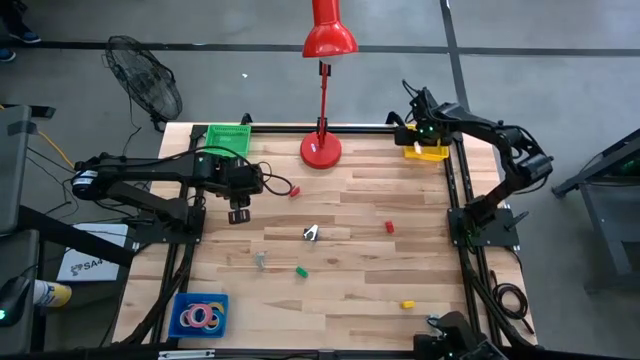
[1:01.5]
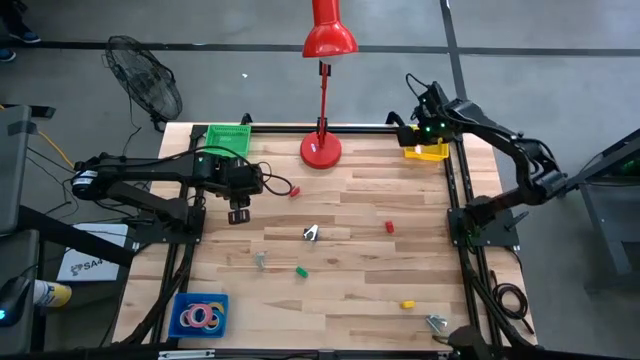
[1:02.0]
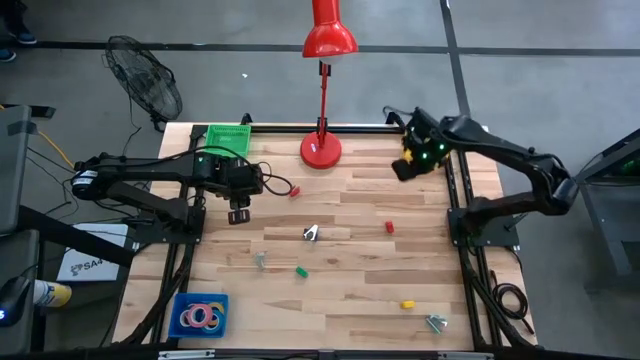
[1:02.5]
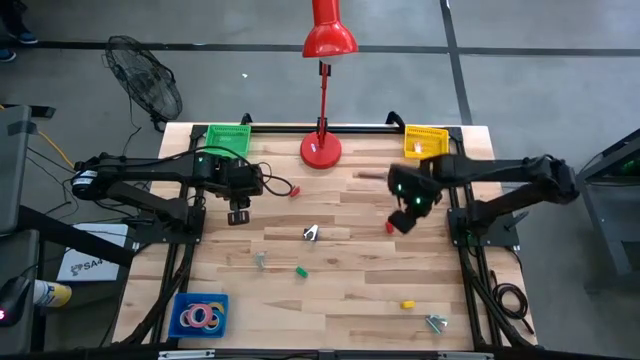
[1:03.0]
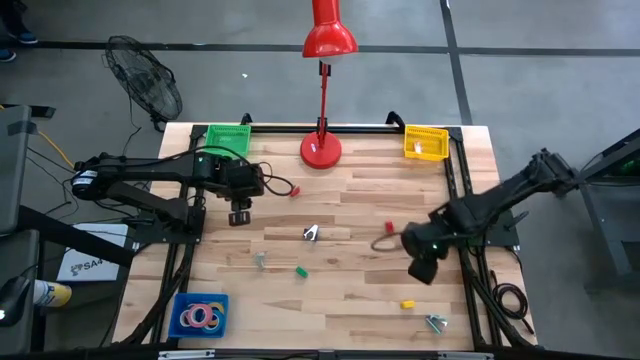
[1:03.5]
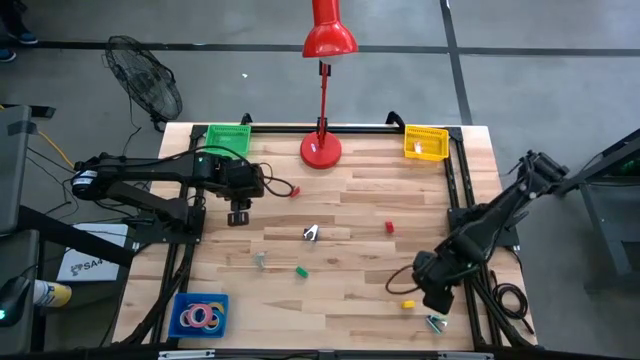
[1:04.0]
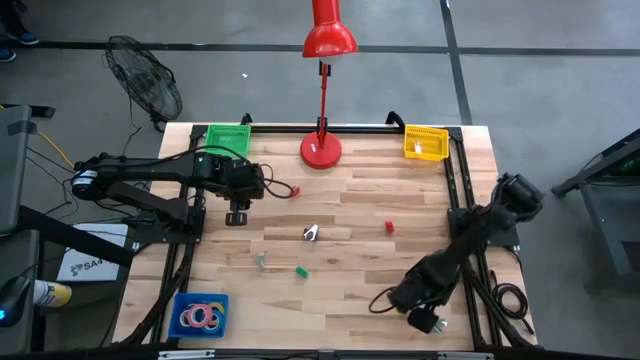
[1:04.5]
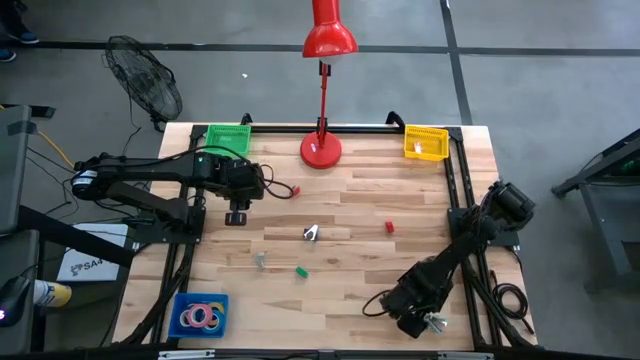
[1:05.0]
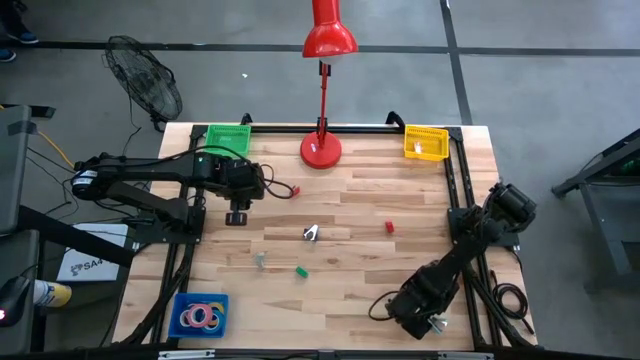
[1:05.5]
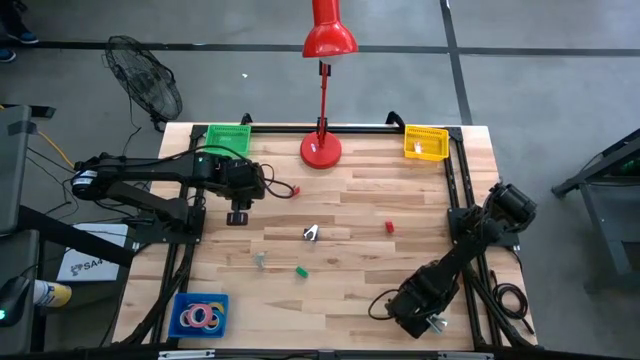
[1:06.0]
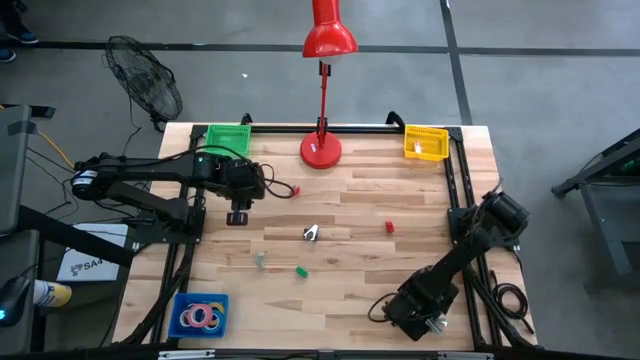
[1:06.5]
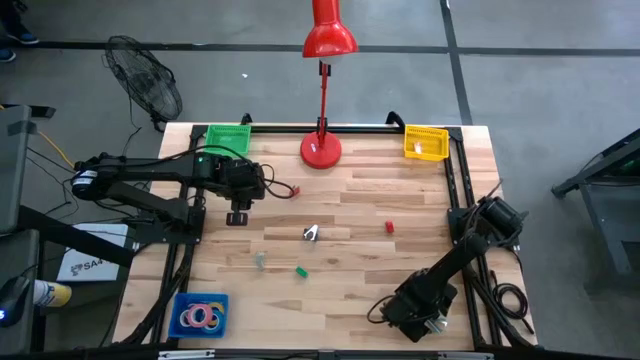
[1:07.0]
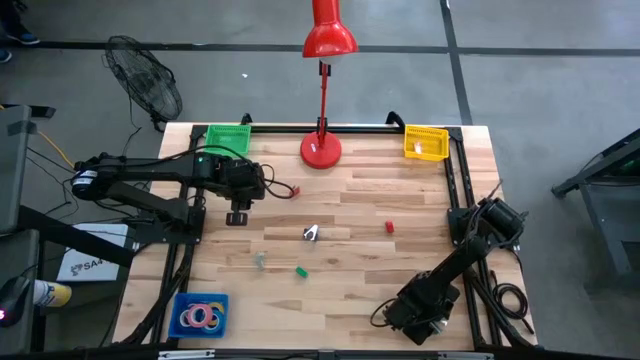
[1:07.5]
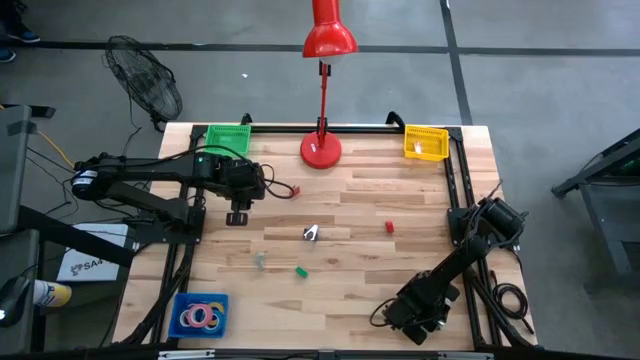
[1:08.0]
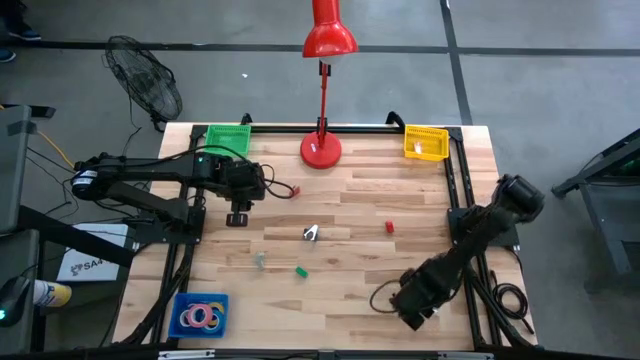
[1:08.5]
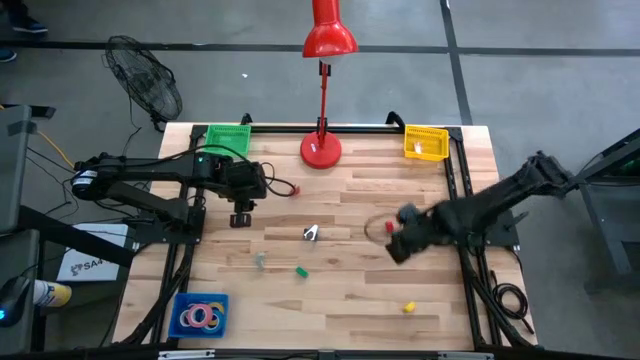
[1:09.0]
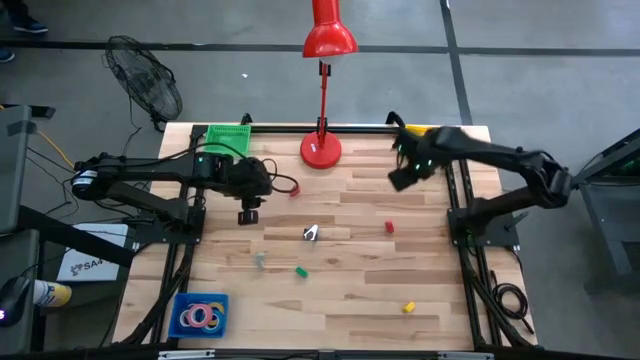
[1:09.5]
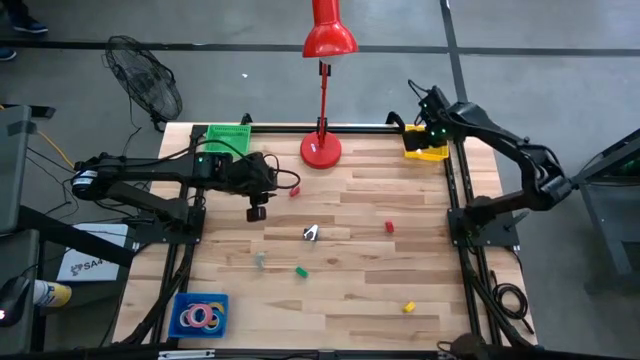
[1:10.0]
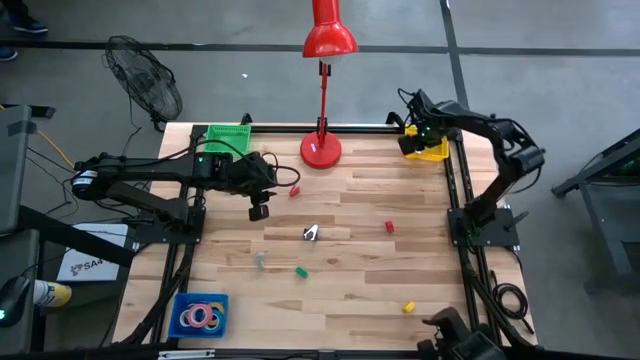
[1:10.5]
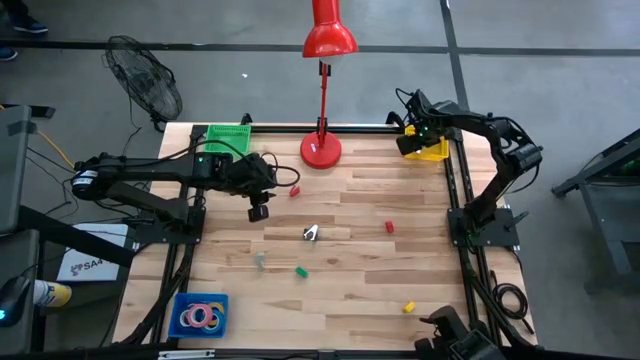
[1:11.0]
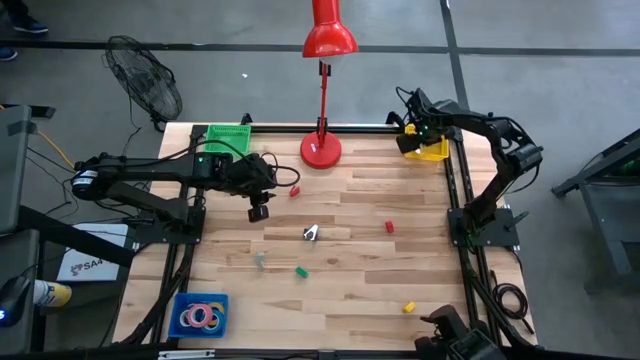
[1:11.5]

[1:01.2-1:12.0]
Task: Pick and place Stapler, Stapler remover, tape
Put the light blue staple remover into the yellow basket

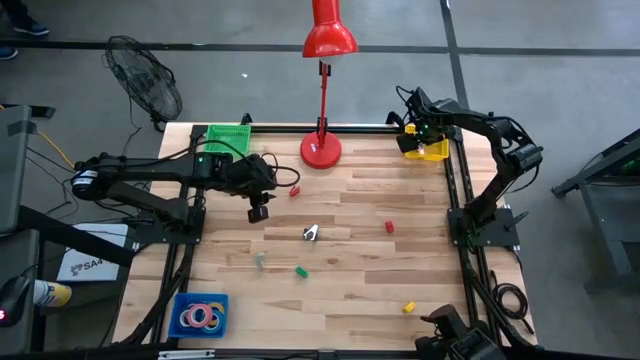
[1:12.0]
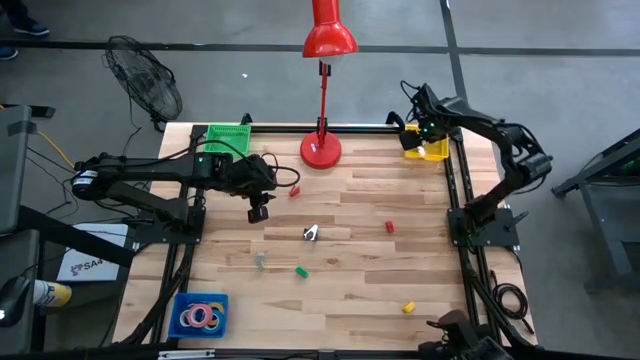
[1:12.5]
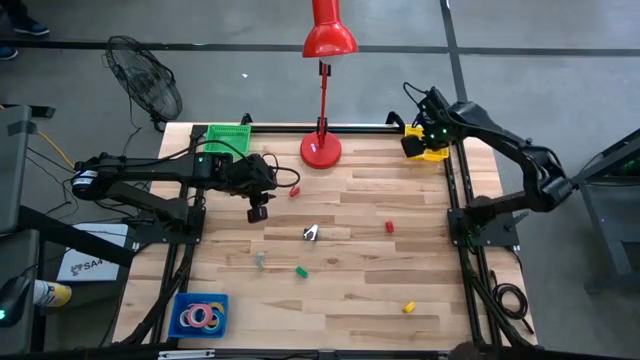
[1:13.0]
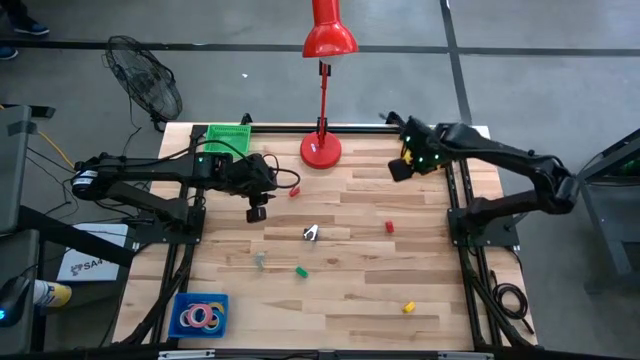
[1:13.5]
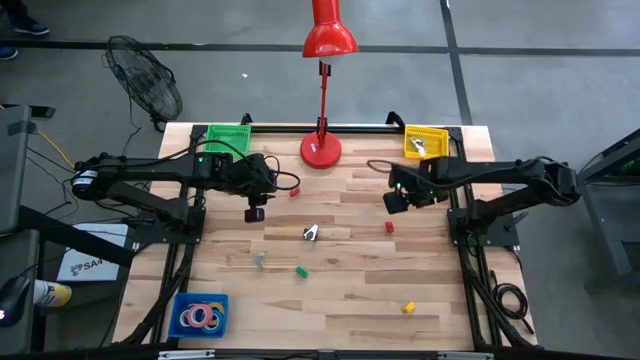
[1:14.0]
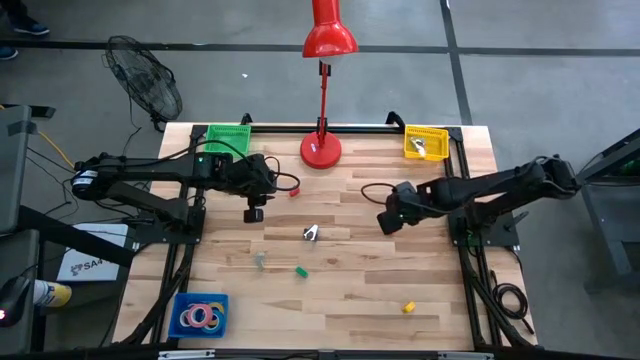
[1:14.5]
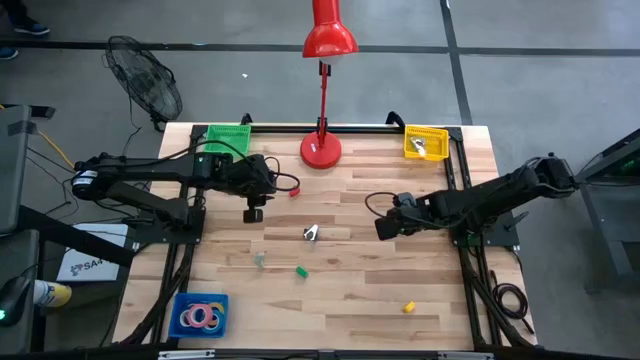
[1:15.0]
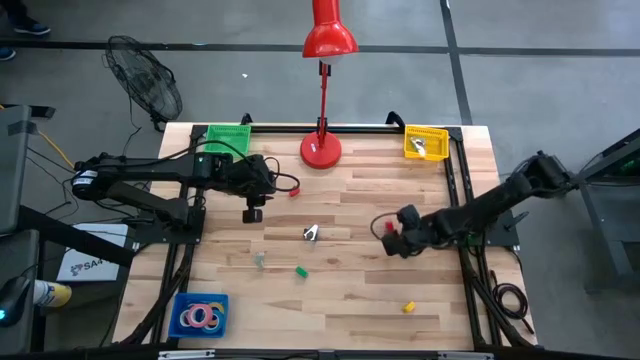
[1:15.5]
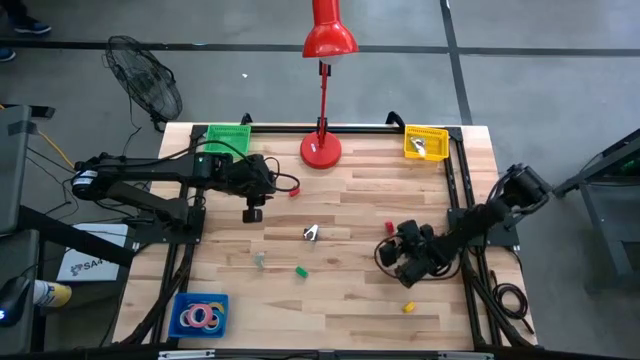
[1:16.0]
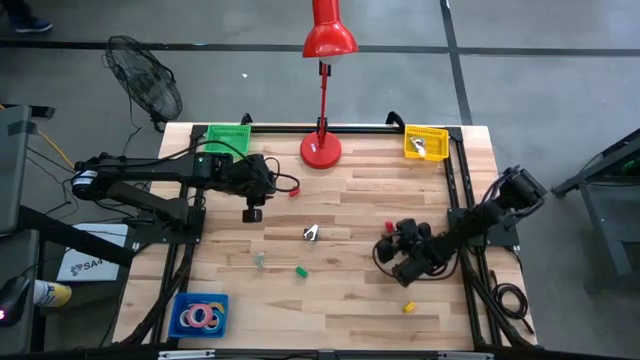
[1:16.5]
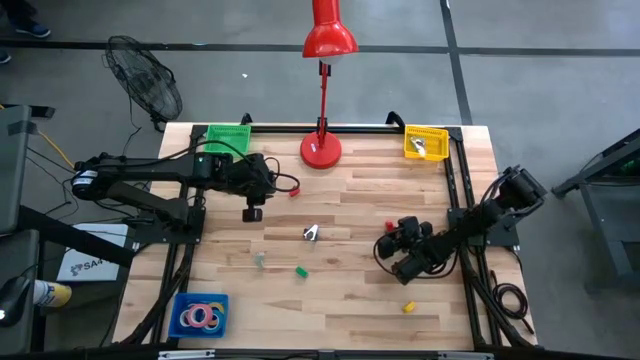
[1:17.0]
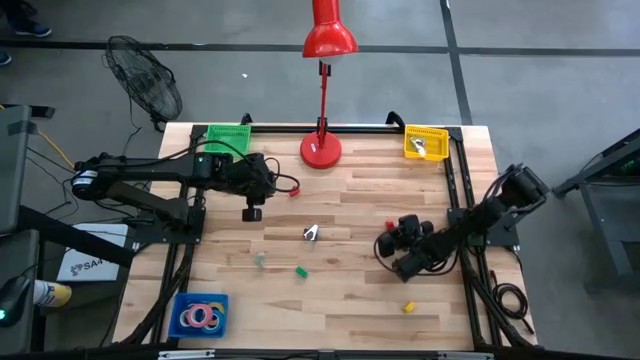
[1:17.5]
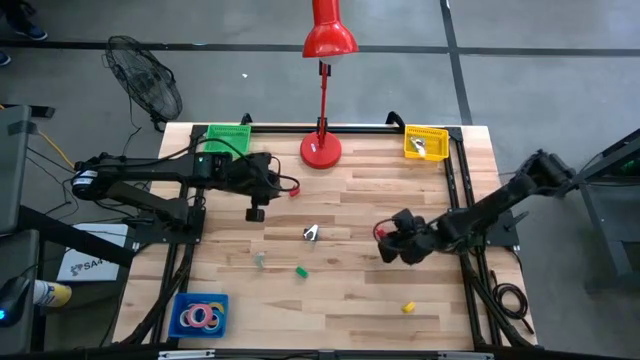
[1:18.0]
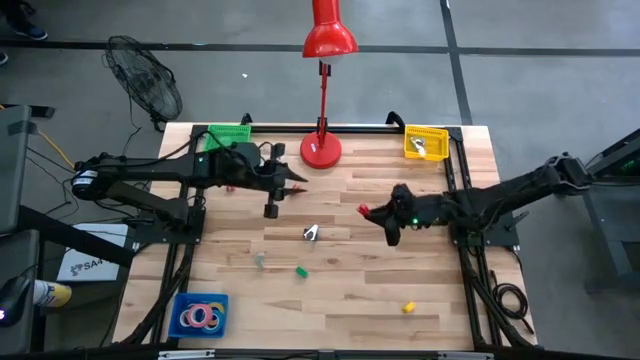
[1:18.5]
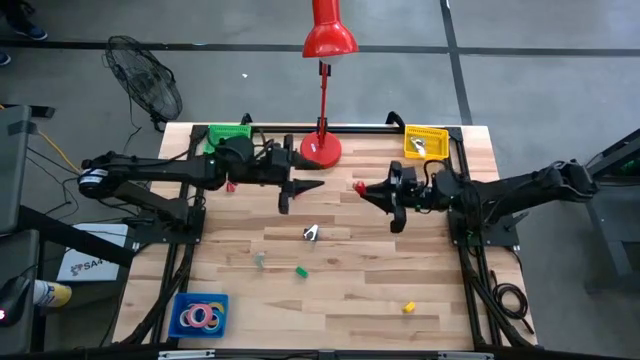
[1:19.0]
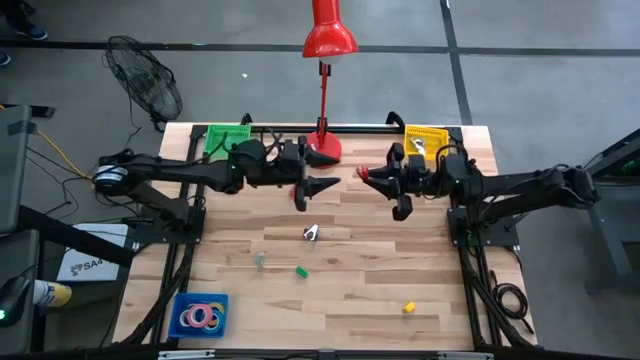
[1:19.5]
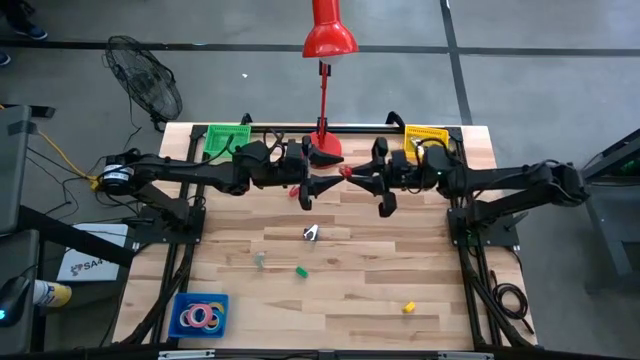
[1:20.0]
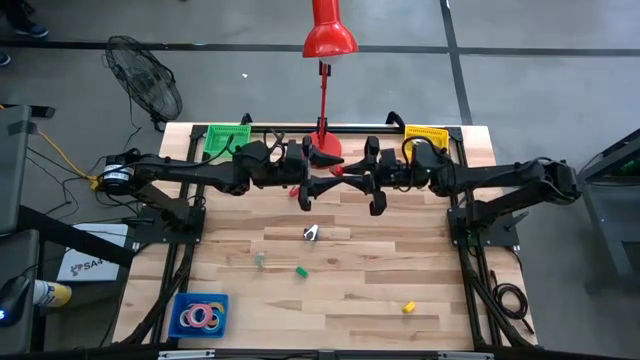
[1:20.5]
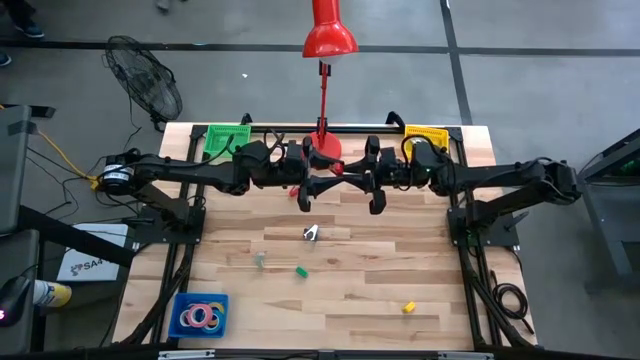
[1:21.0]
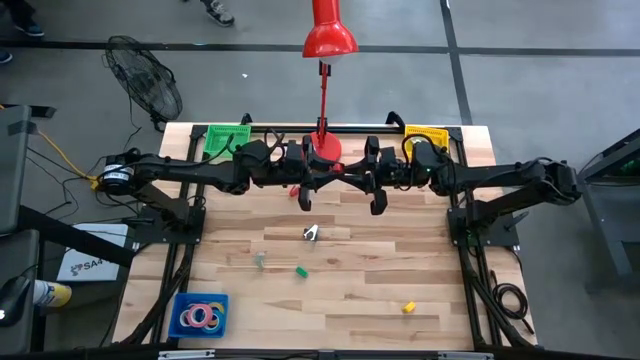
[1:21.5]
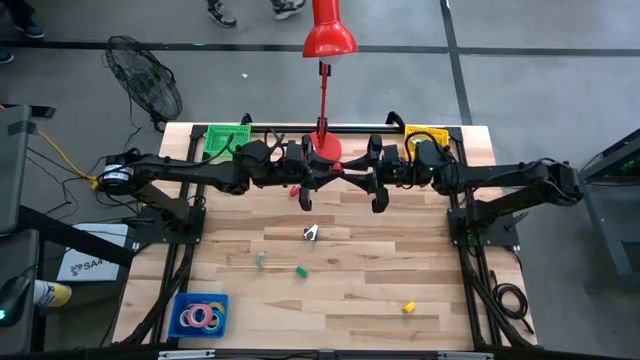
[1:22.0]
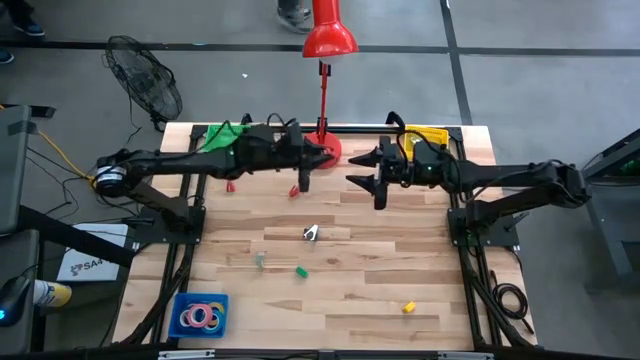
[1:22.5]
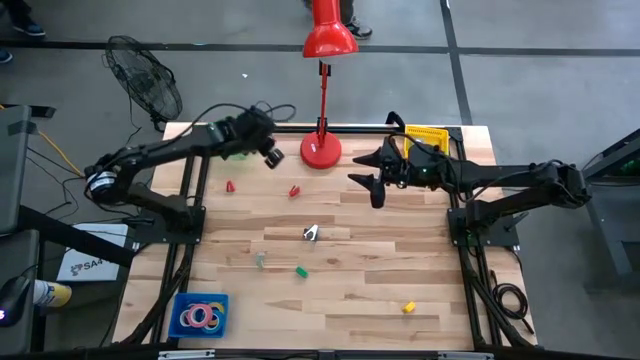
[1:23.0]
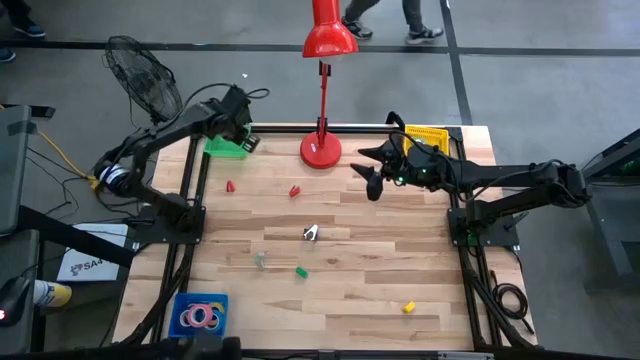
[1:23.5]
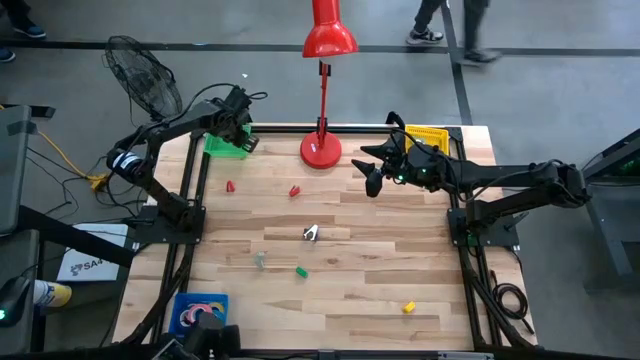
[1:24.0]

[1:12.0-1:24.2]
Put the bottom right red stapler into the green basket
